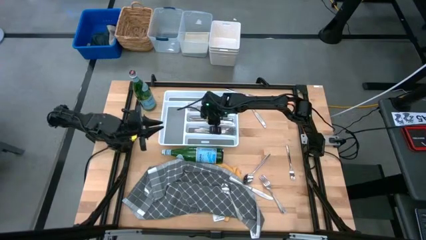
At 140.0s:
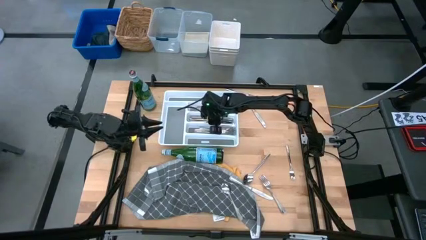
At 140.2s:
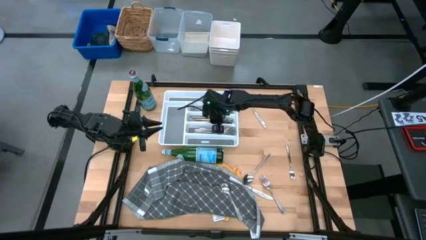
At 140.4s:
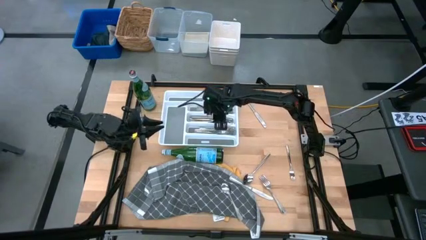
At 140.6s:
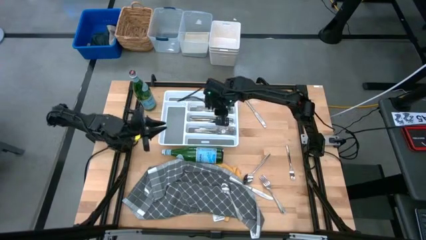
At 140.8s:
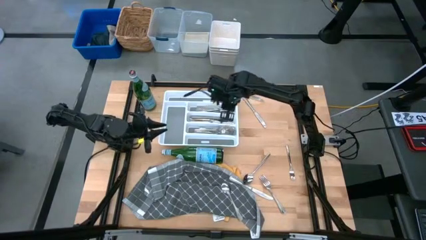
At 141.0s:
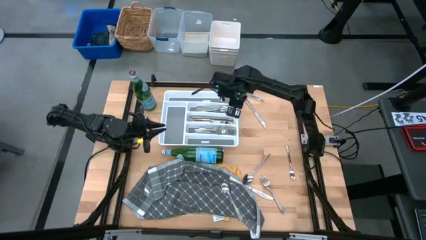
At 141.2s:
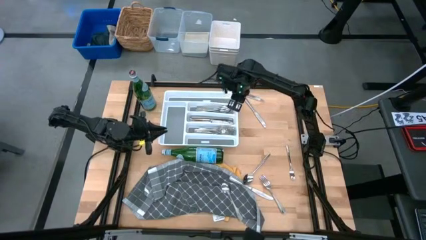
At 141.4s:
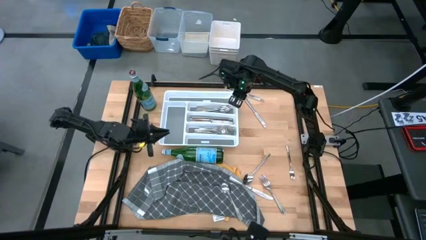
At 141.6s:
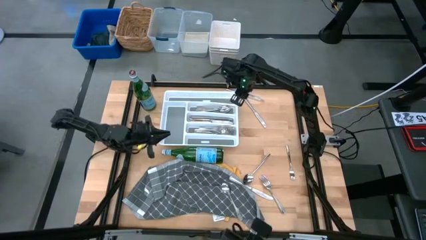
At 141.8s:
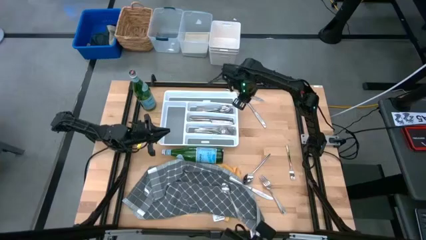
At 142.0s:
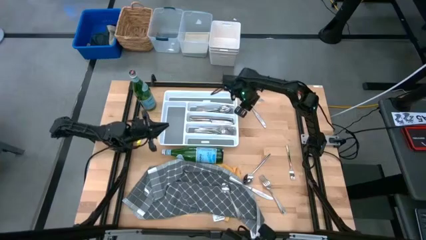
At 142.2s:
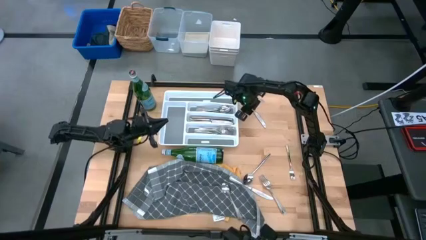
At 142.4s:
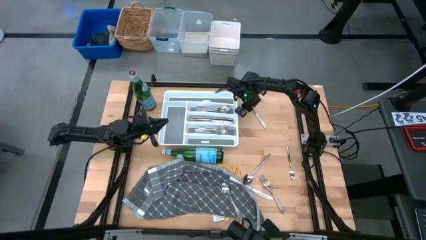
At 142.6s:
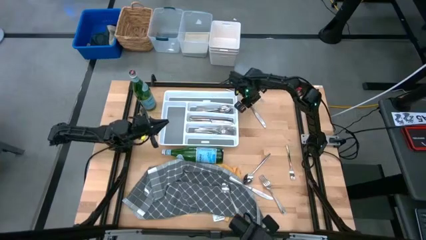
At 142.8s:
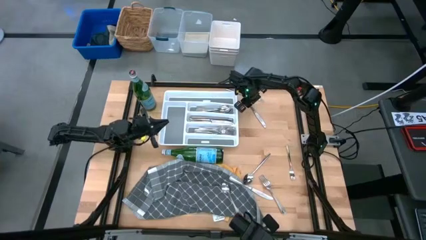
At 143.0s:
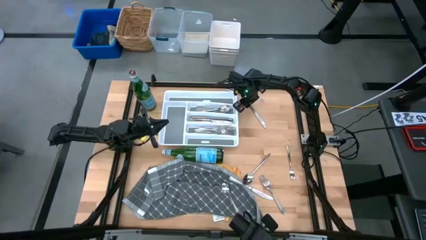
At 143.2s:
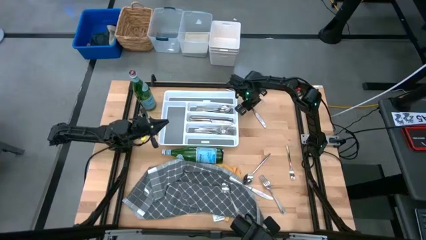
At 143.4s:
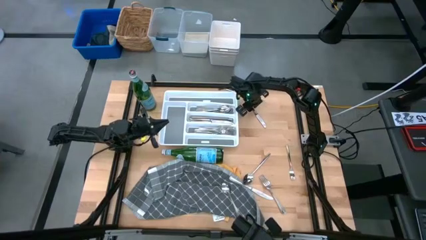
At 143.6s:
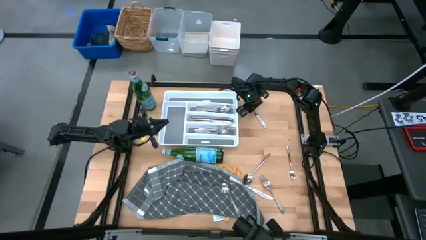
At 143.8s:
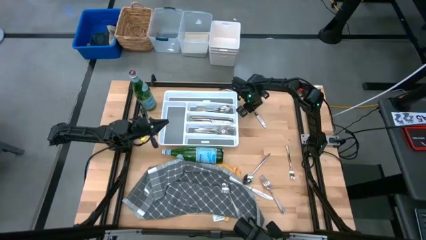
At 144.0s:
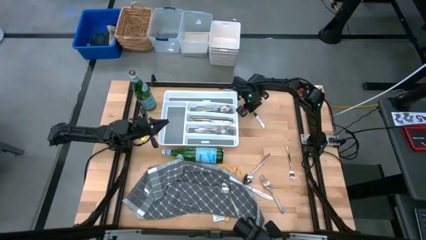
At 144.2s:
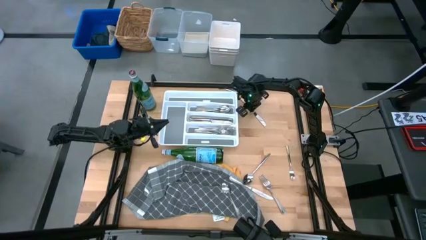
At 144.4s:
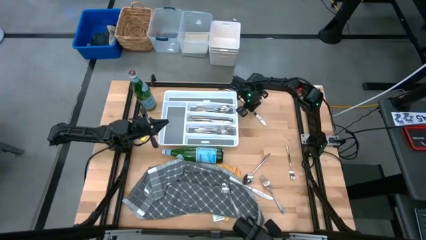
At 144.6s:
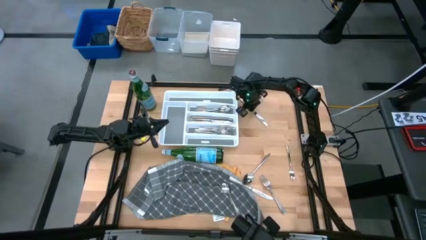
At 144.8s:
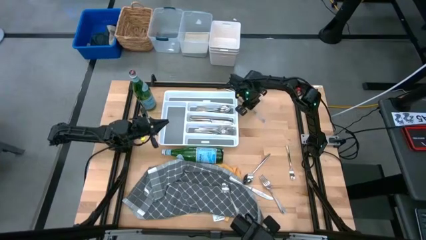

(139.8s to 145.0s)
Task: Sort silverware
Put the silver table knife into the silverware tray

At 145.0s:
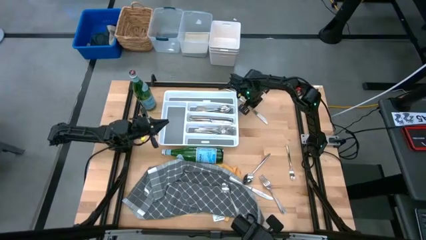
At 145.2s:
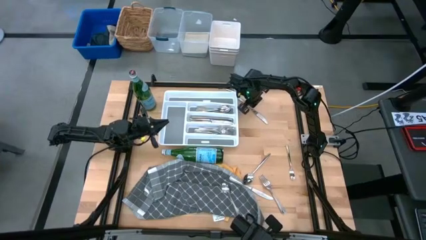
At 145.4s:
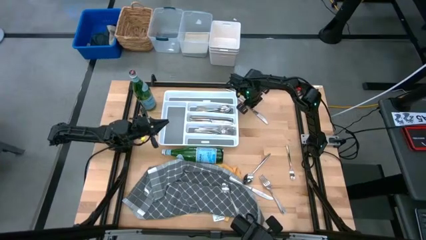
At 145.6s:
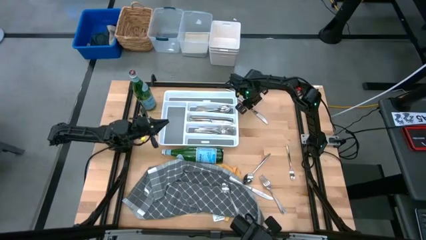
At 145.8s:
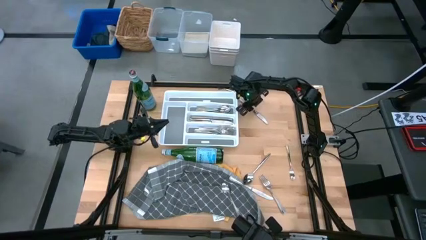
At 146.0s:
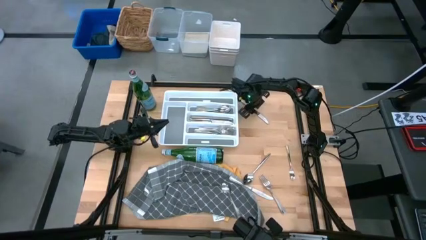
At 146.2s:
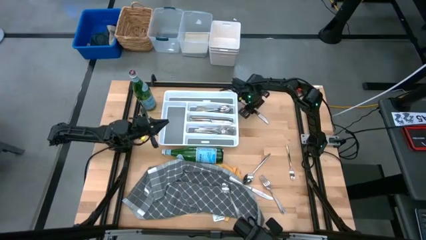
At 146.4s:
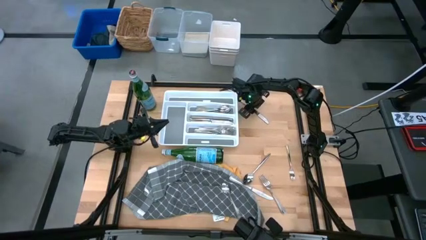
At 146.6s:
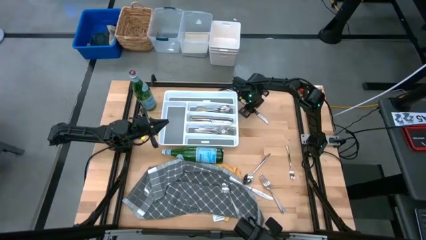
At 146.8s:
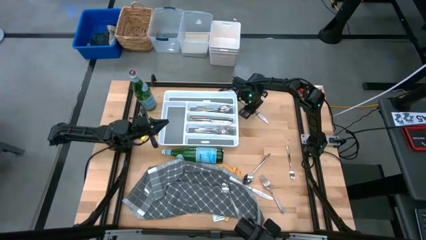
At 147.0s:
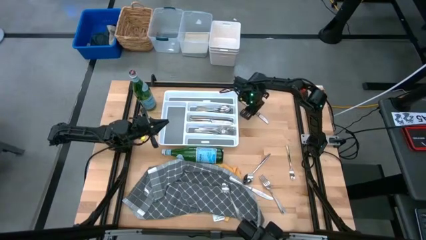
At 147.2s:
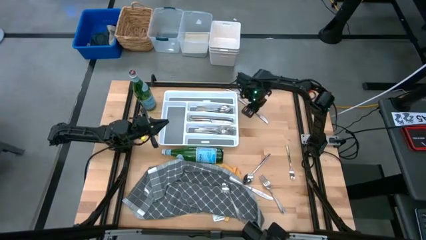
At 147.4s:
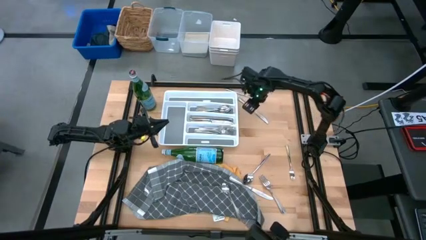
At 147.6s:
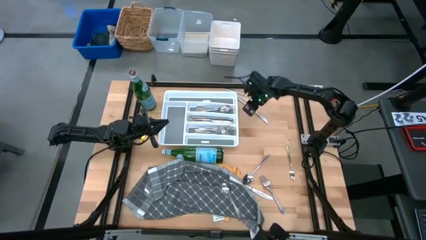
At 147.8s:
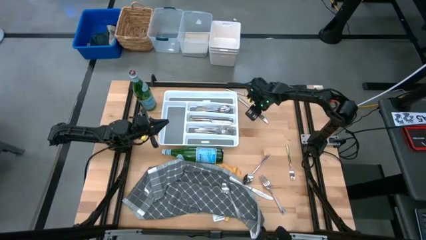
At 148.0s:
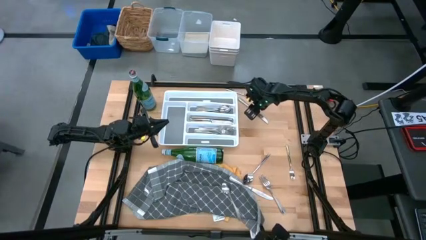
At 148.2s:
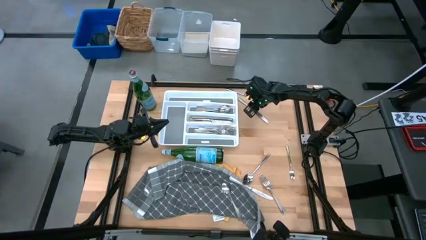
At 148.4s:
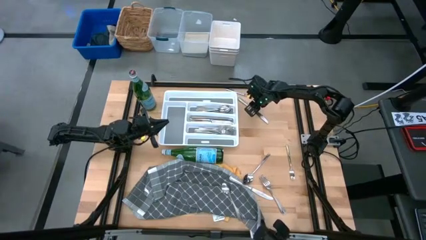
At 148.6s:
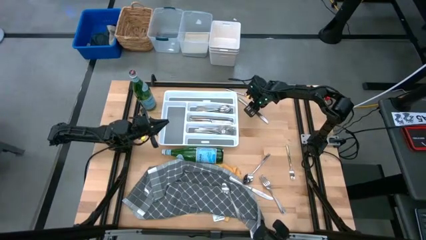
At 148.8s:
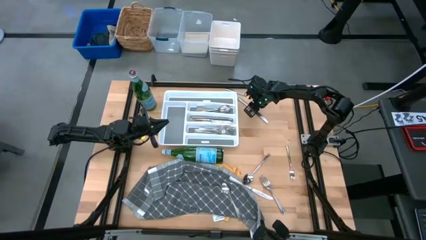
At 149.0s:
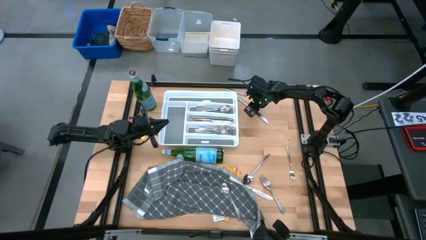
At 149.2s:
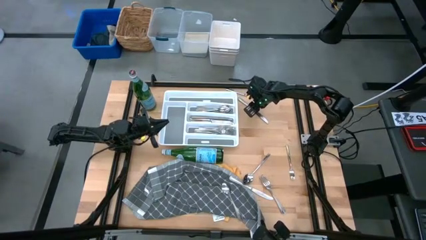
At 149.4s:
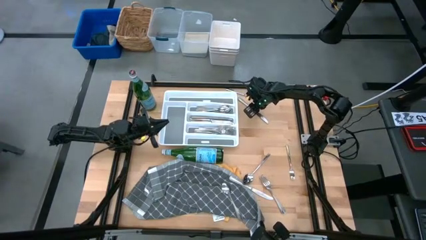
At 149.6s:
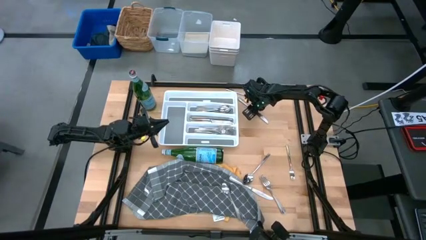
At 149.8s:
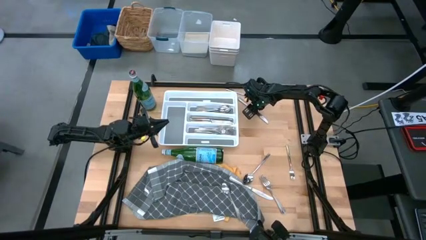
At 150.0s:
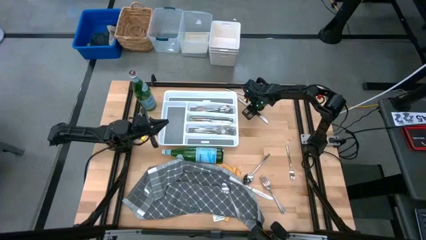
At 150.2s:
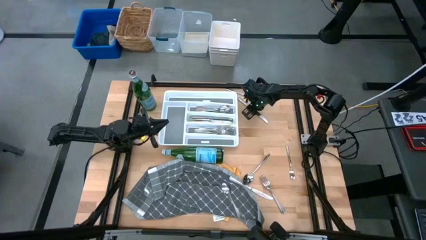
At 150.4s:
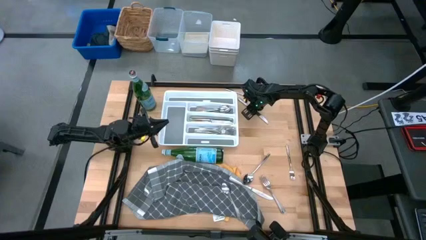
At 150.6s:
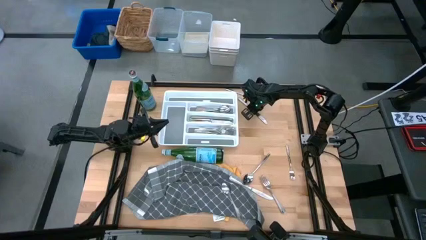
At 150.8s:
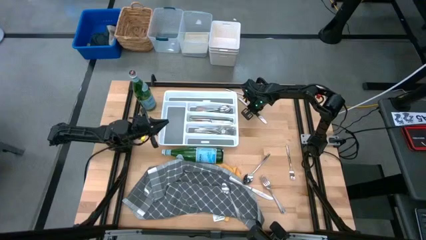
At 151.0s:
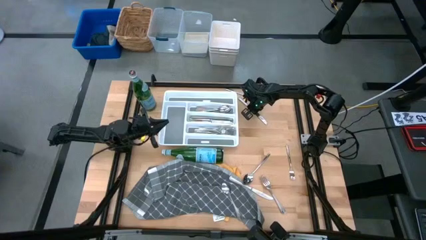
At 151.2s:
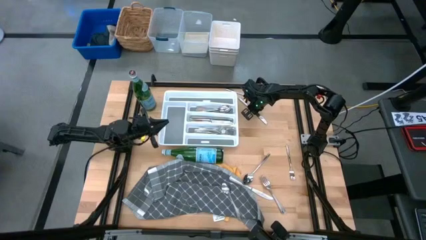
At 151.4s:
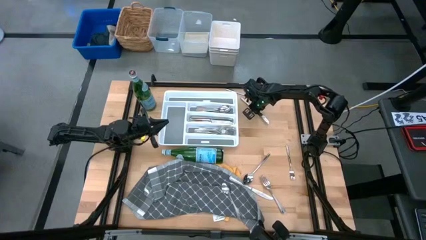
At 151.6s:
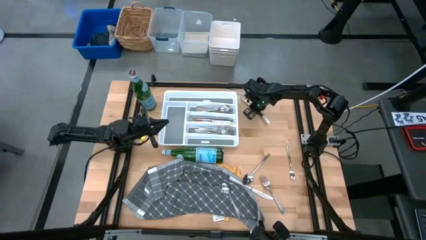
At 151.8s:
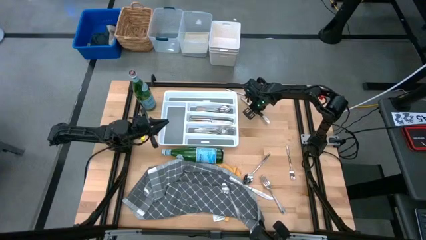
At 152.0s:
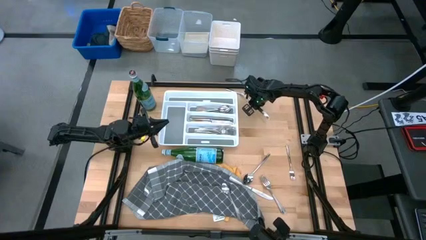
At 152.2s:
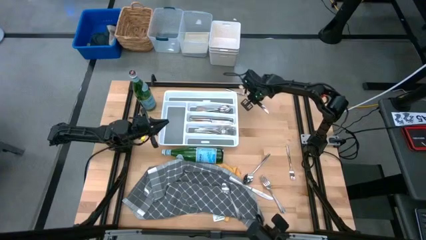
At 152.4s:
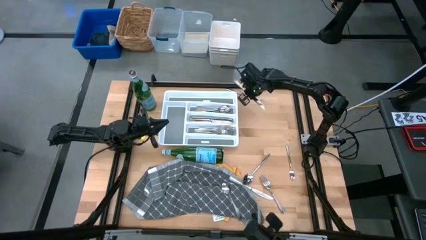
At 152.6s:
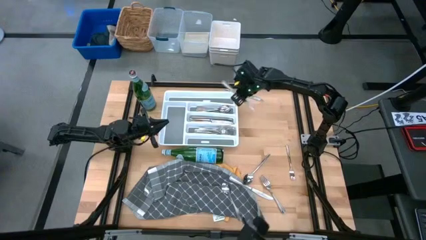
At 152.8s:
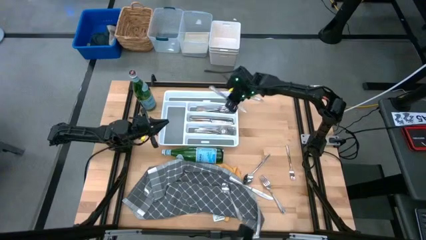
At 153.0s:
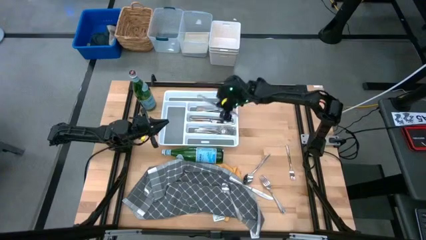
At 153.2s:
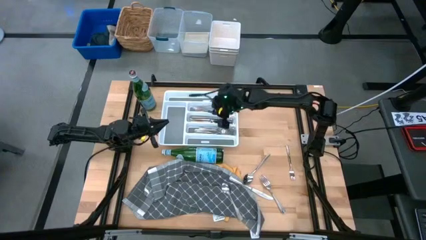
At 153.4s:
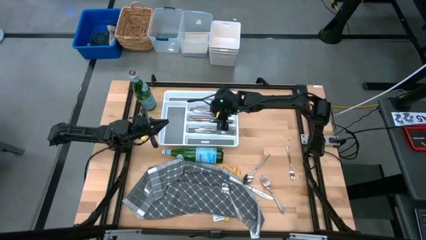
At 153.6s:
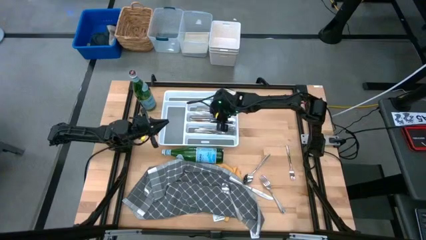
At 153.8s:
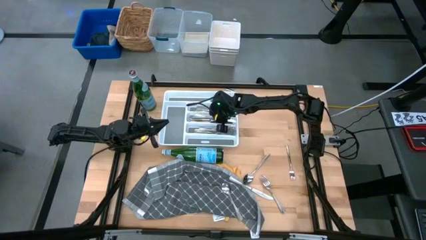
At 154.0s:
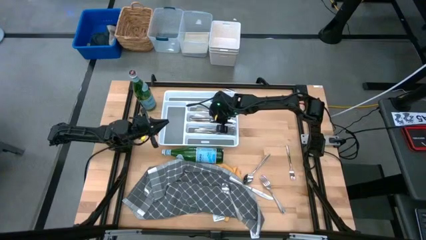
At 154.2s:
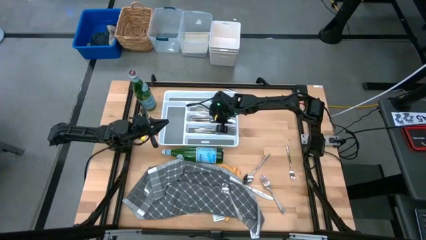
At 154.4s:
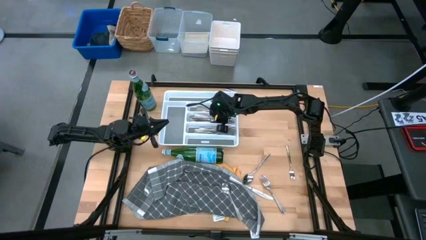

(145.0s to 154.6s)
Put the silver table knife into the silverware tray

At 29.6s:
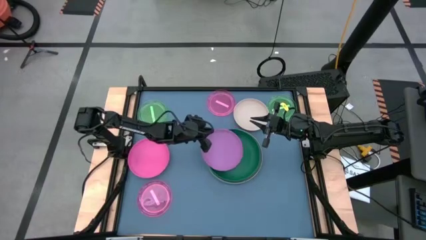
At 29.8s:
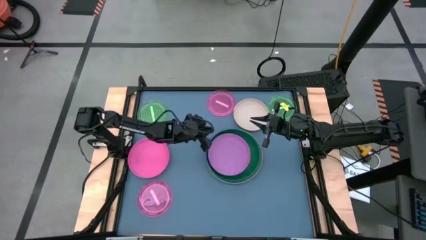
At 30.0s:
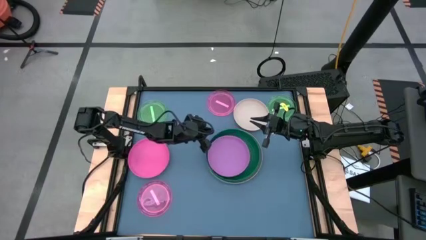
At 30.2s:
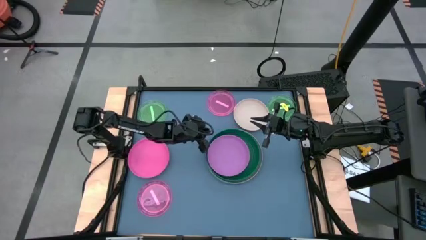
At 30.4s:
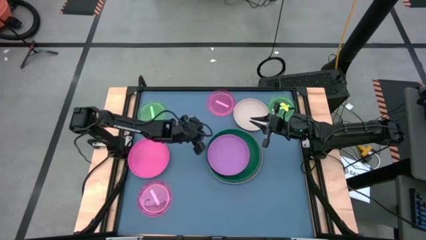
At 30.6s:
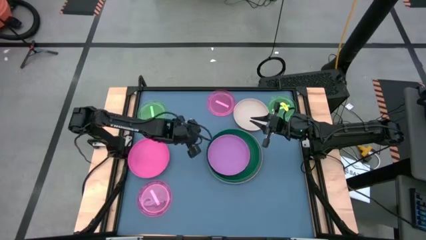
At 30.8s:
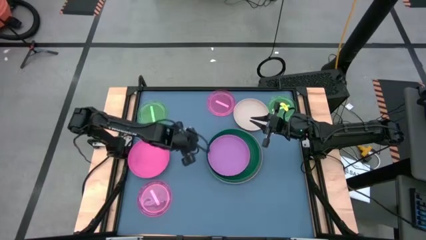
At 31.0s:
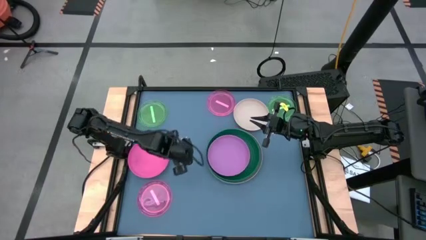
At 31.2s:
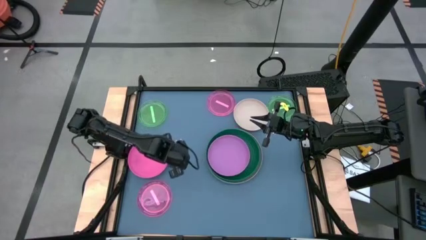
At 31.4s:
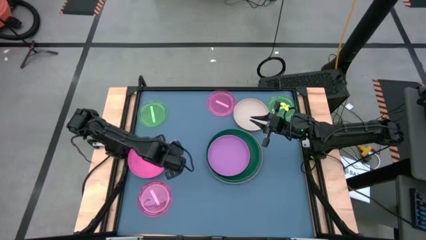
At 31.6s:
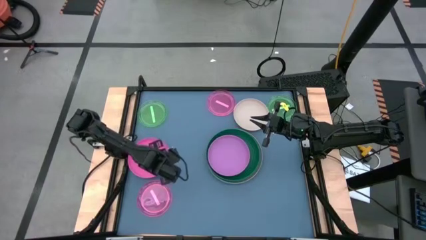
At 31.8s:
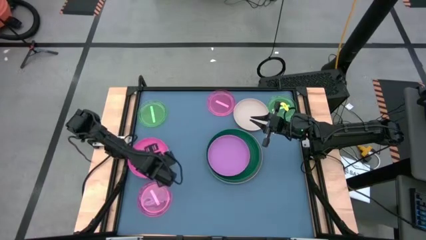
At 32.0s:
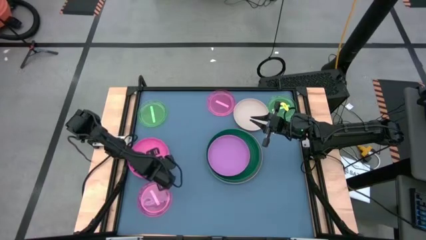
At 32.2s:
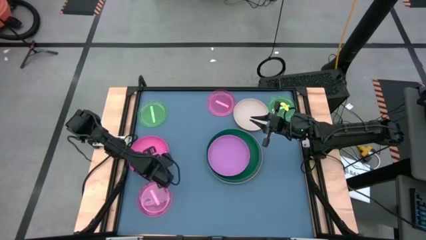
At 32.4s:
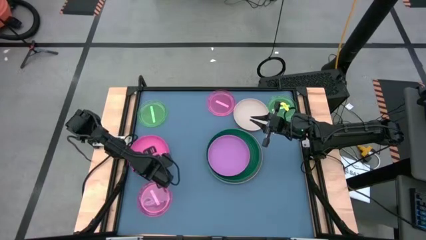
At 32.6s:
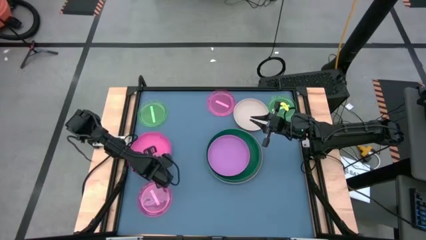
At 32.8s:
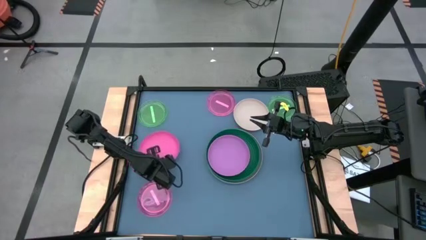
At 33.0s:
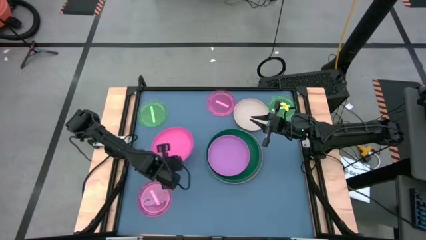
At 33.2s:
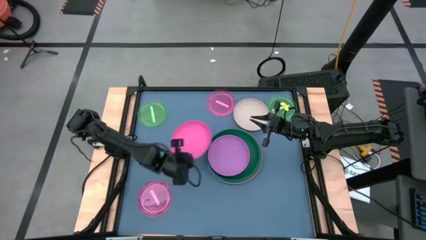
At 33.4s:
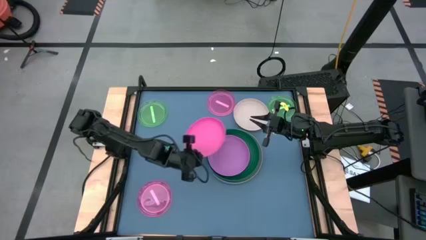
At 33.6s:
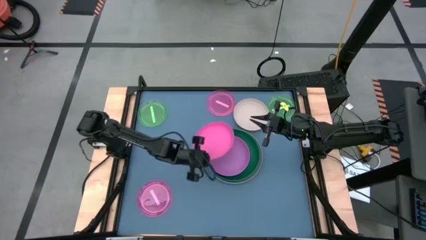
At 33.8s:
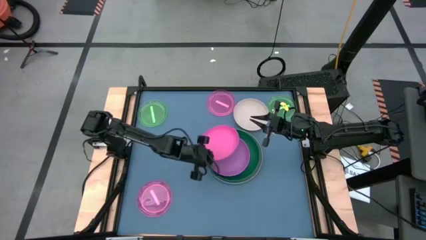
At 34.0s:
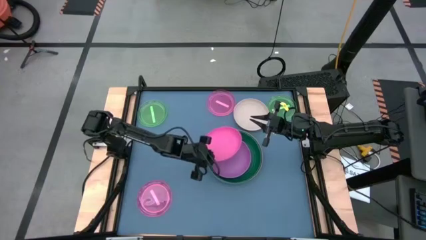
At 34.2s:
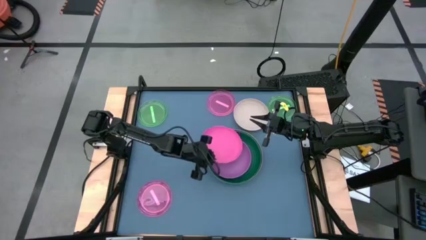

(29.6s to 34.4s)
Task: Stack plastic plates
Stack the pink plate on top of the purple plate
